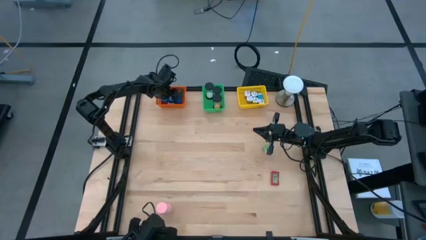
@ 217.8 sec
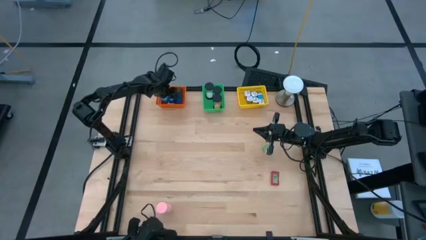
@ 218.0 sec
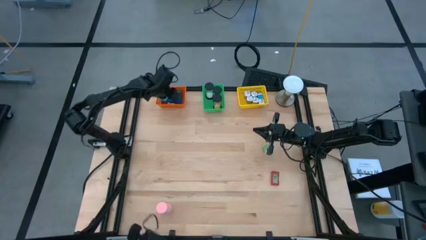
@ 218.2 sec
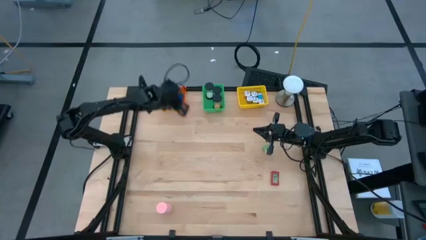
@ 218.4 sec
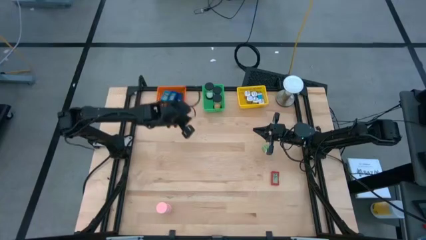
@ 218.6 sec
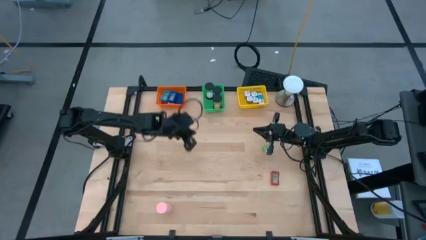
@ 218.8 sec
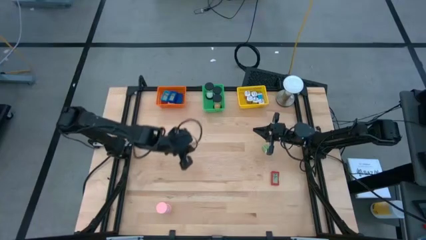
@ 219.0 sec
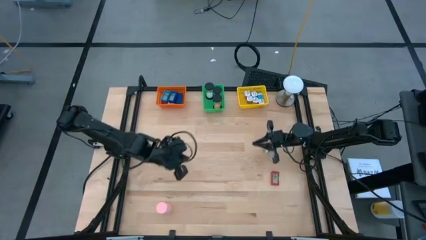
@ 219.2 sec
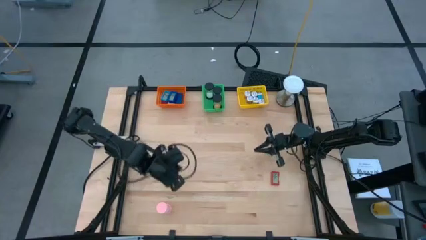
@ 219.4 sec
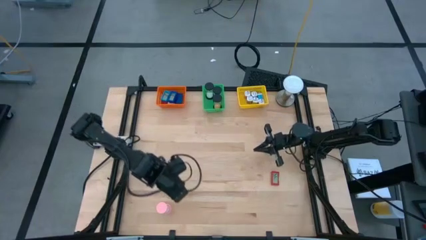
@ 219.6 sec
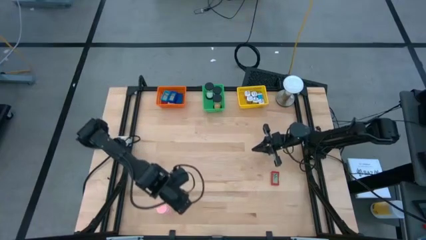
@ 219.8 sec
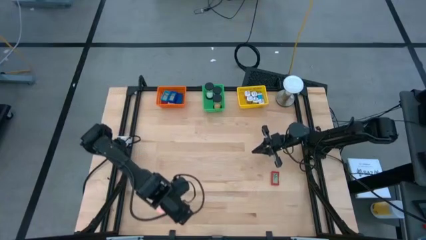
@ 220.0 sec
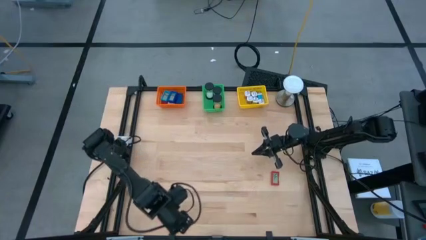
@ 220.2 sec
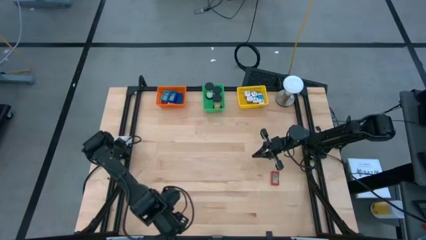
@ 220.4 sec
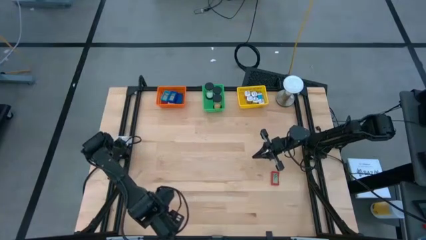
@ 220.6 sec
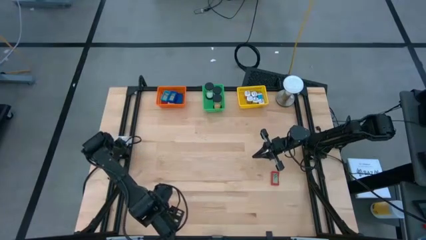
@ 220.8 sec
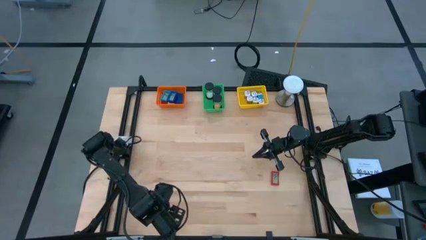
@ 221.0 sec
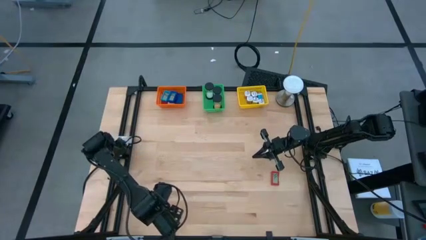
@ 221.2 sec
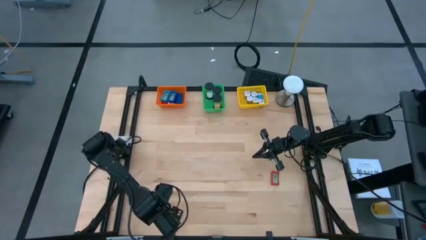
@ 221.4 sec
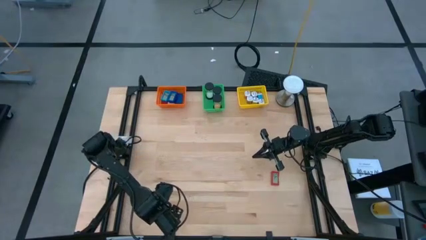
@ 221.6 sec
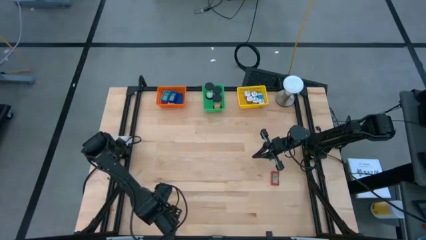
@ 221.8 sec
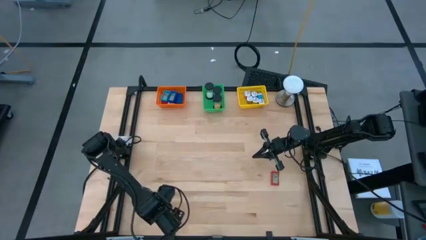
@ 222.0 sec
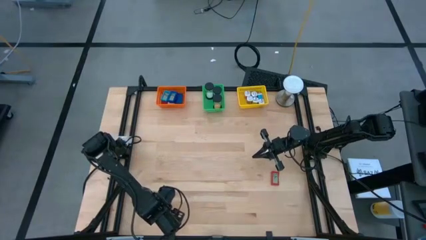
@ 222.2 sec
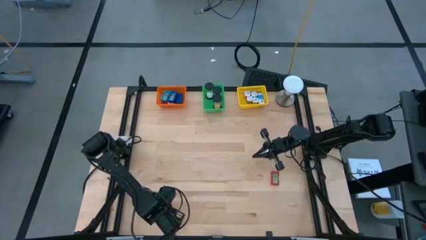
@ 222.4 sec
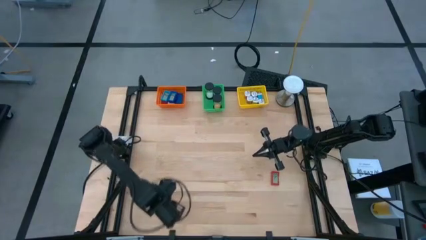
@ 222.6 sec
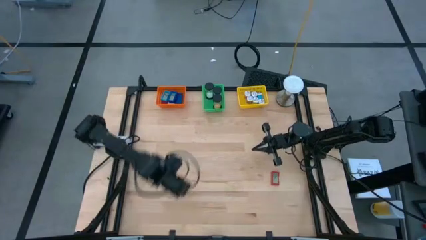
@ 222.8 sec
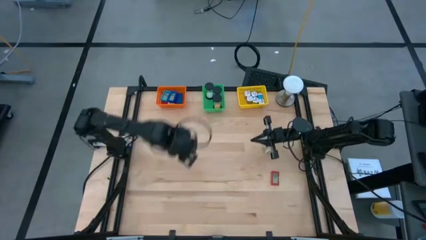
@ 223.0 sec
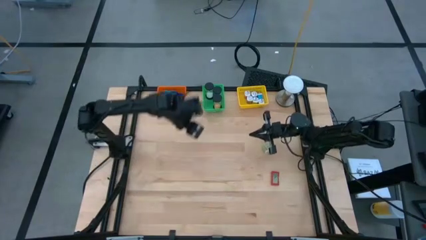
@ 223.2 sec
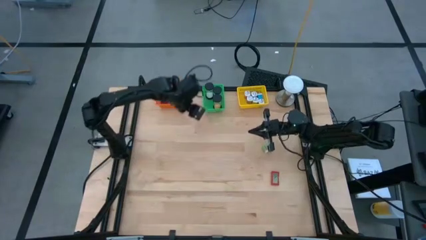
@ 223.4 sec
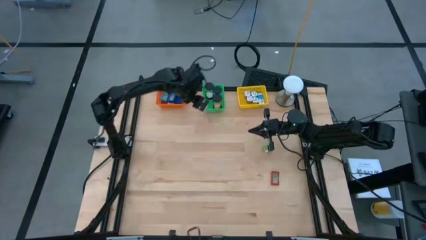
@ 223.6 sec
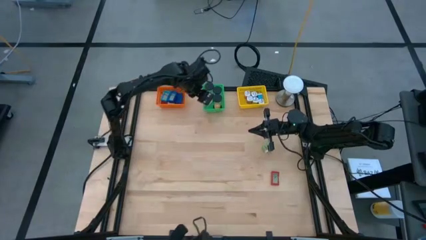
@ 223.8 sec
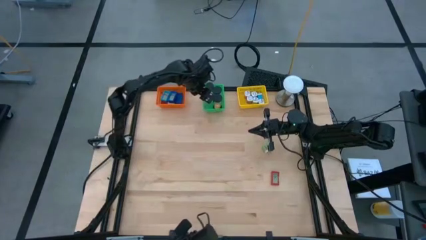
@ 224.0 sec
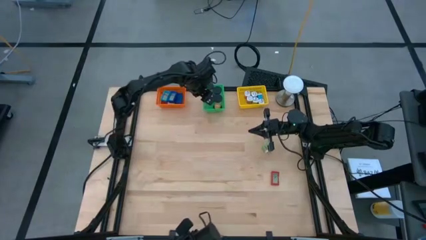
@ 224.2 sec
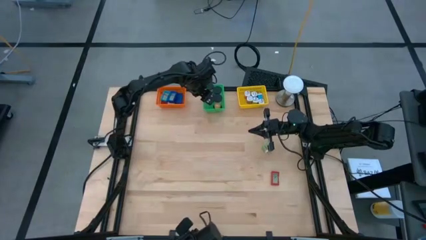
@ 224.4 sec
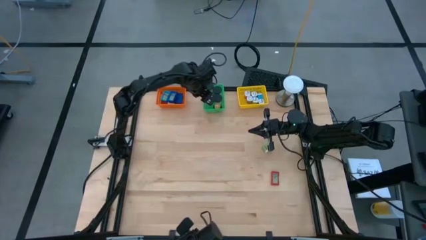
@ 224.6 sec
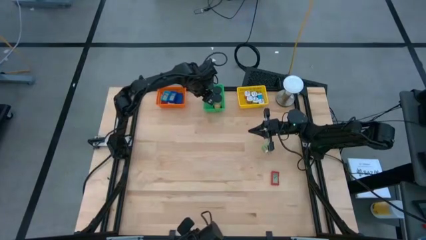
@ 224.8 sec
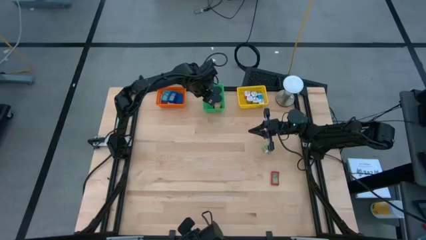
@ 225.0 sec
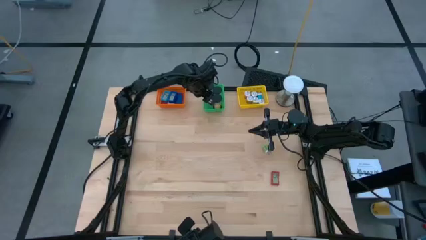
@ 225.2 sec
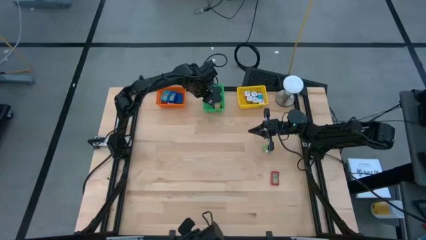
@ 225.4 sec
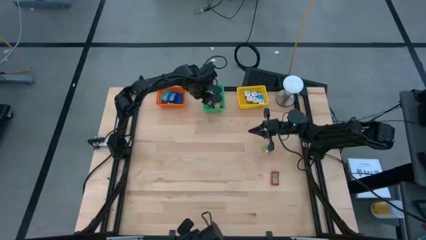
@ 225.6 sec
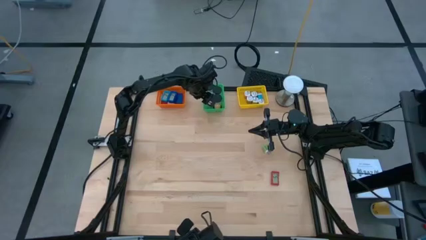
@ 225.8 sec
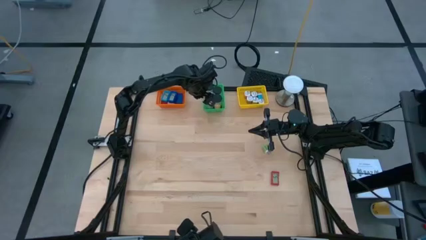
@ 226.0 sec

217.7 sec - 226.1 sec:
Task: Pick & Place Office items
Put the pink hourglass into the green bin

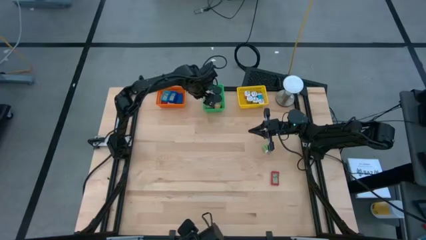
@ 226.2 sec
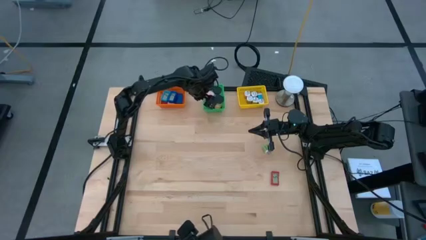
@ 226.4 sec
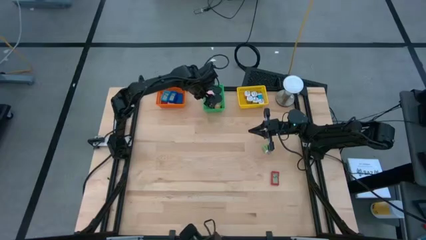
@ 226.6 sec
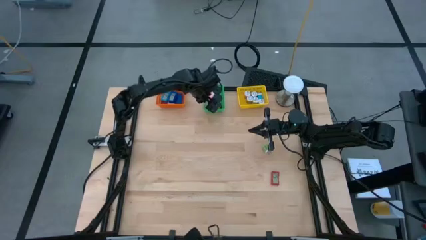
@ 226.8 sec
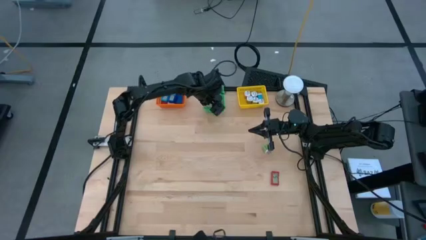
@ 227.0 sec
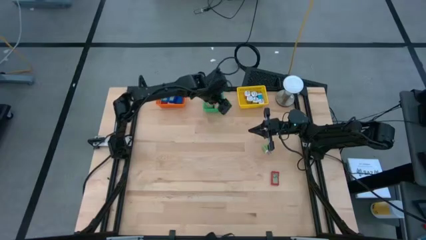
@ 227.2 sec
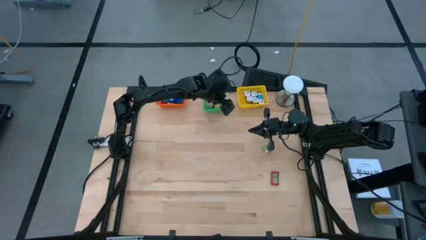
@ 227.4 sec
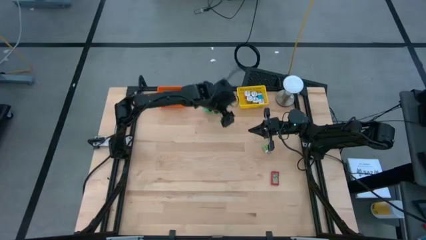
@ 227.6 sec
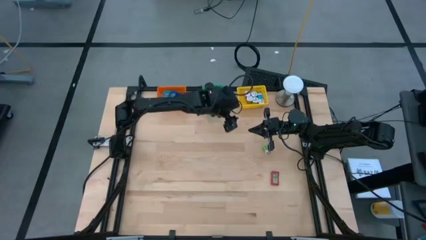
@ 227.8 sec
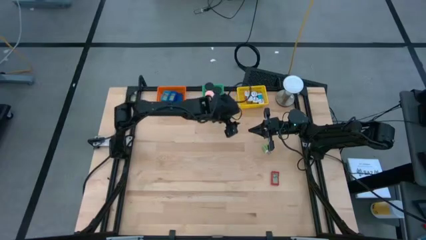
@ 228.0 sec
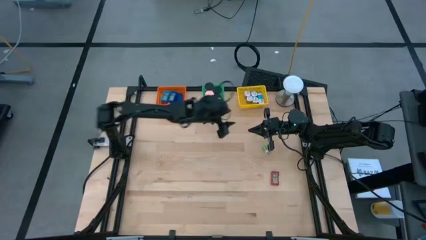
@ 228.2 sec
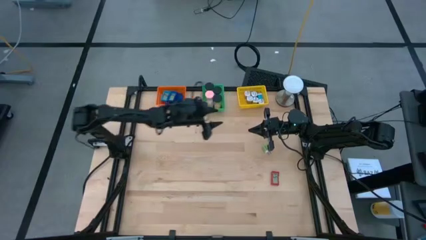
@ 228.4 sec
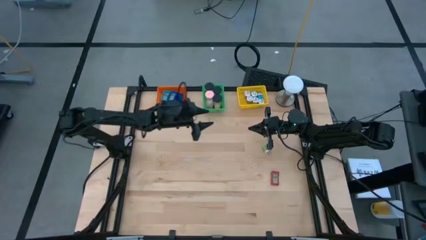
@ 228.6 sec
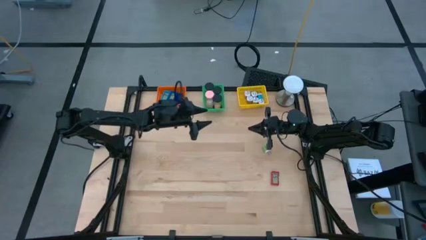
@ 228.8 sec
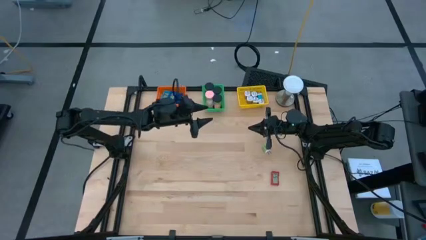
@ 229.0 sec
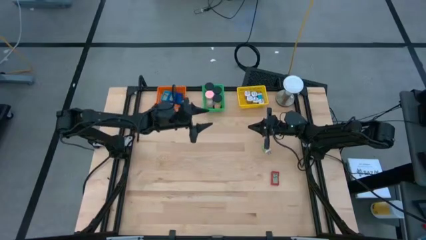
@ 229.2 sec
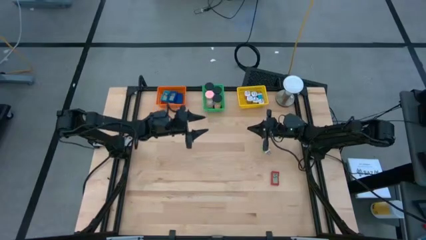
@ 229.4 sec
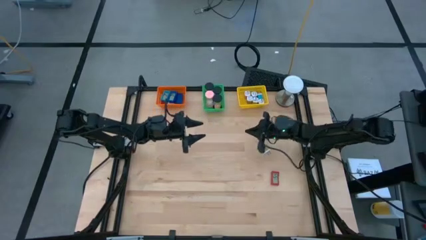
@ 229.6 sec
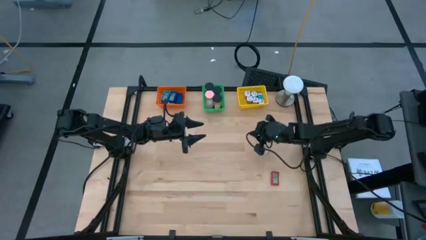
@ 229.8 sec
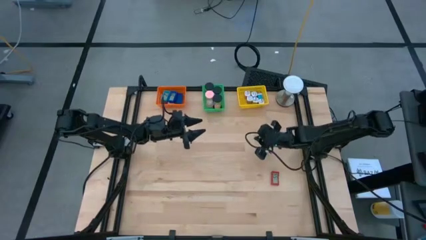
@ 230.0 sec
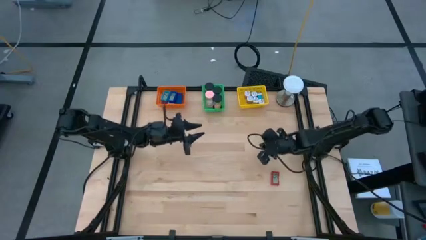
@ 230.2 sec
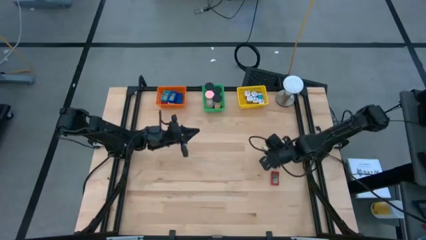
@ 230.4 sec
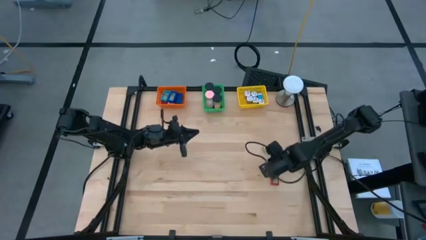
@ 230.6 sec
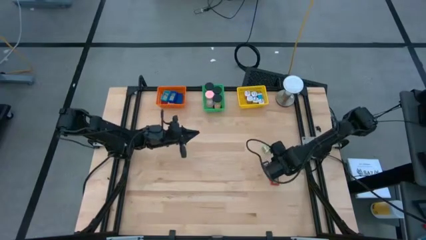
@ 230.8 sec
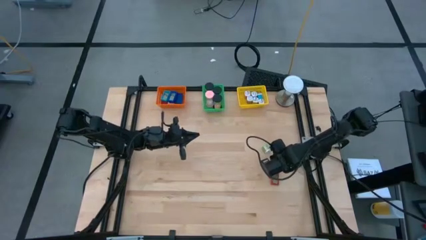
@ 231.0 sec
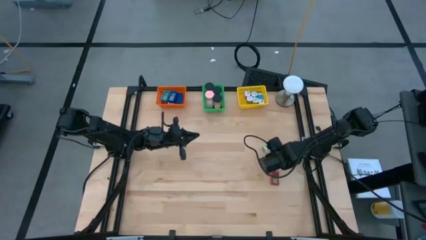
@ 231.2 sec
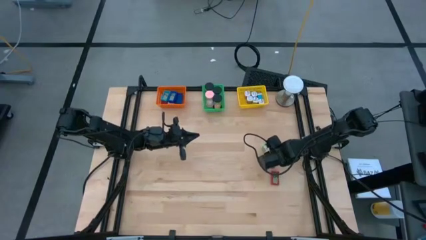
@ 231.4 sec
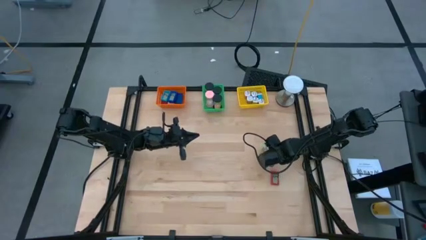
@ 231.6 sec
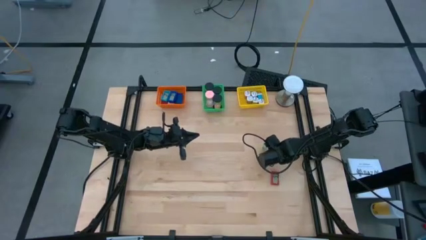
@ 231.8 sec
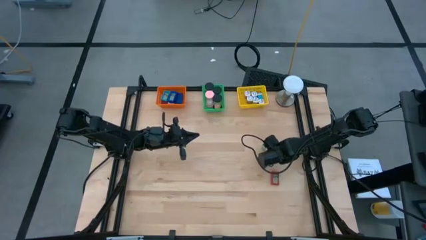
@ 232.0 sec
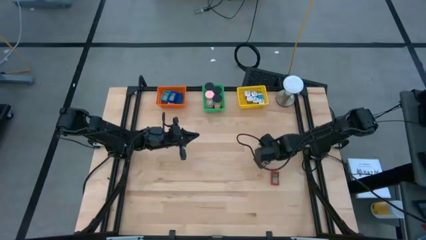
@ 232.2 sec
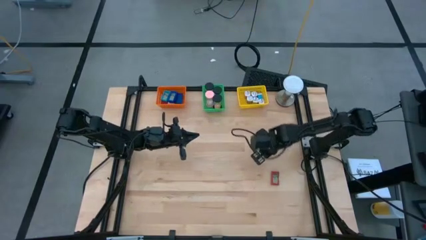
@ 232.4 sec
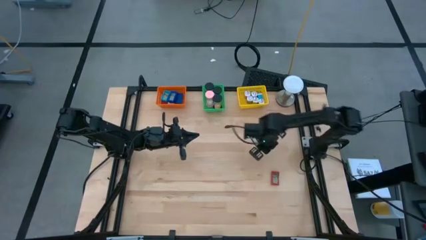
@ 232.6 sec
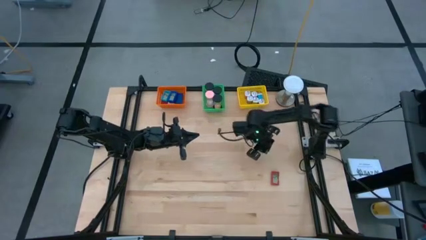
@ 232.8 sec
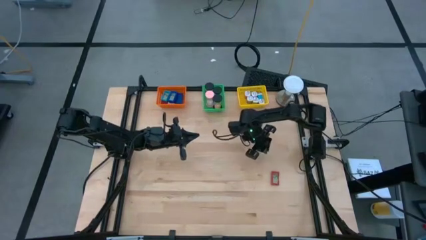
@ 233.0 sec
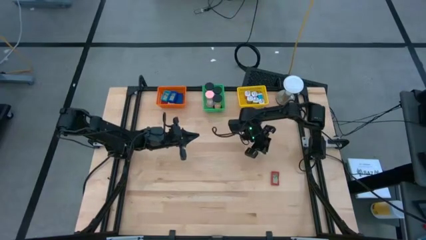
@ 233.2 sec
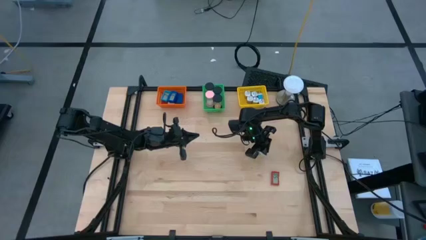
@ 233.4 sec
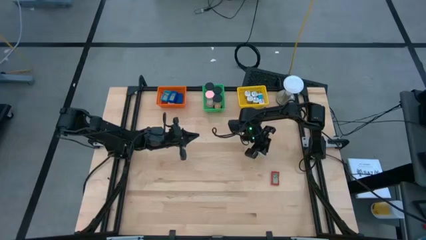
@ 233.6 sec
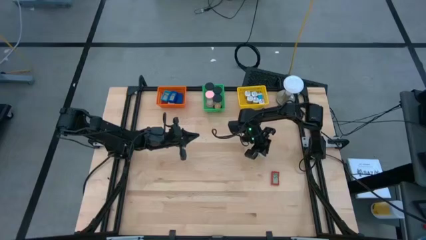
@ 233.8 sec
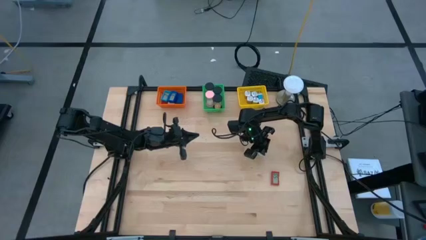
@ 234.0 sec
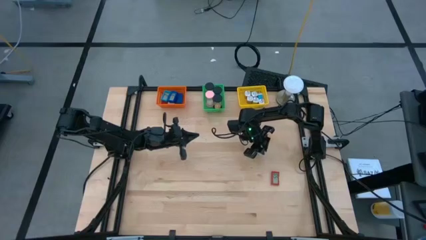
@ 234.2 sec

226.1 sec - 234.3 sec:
Put the green charger adapter into the yellow bin
